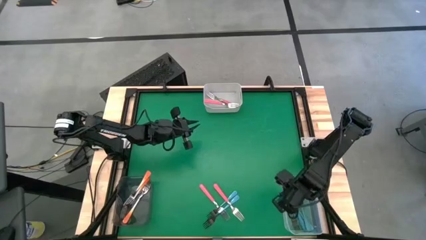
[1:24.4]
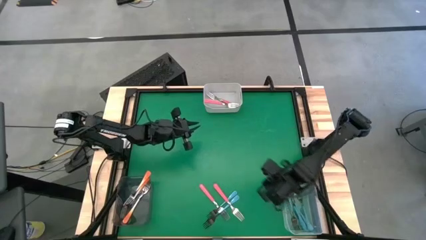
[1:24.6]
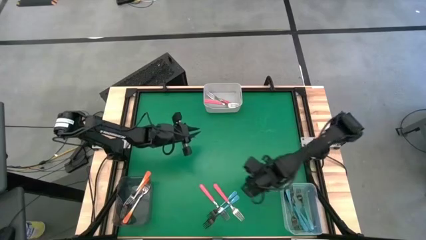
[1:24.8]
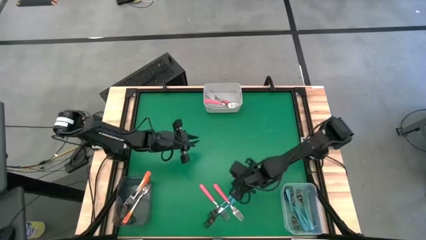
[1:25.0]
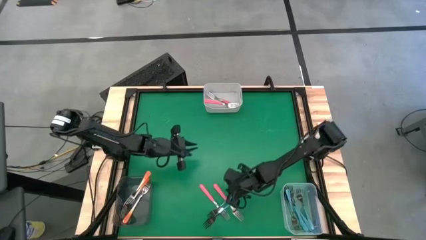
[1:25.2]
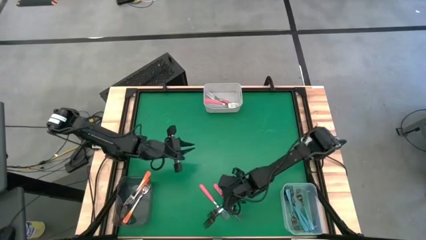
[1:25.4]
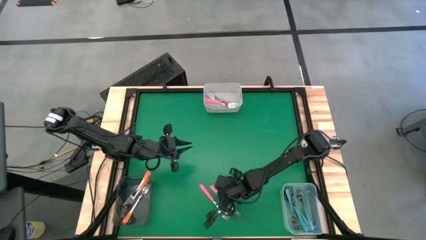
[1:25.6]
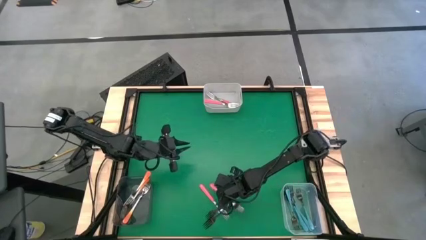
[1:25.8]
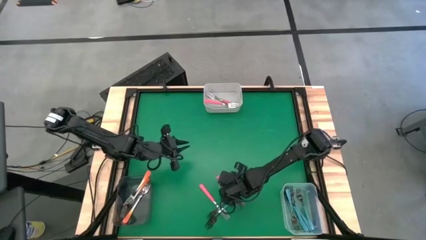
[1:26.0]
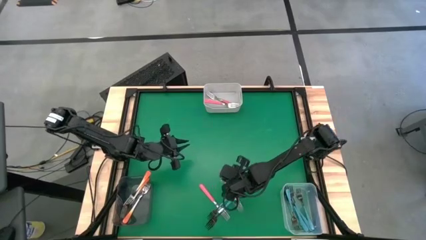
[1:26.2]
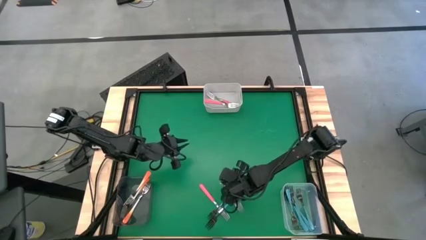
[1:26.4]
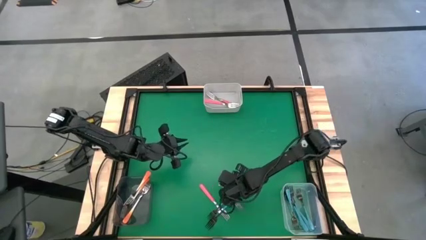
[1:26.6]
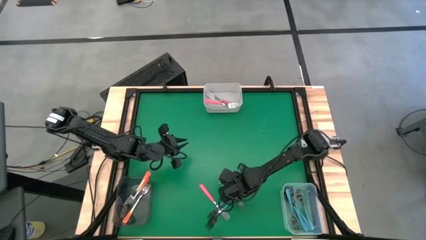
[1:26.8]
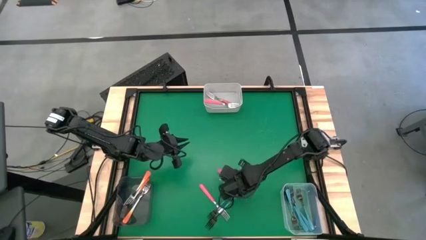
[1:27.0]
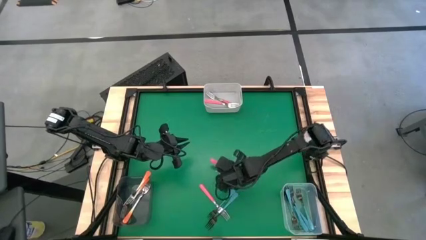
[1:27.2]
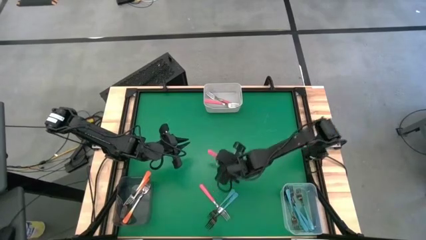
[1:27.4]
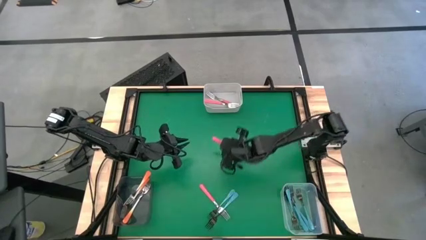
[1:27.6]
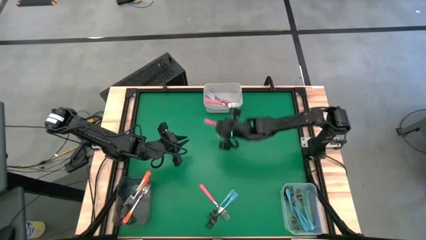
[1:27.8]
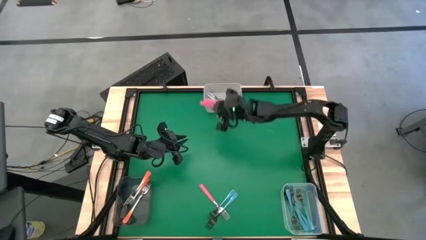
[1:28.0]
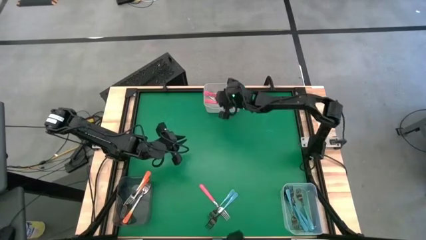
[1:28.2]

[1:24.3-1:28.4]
Task: Sort silverware by color (type)
Put the pink fork into the white bin

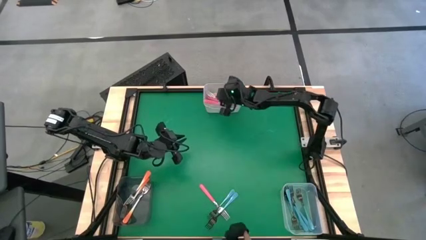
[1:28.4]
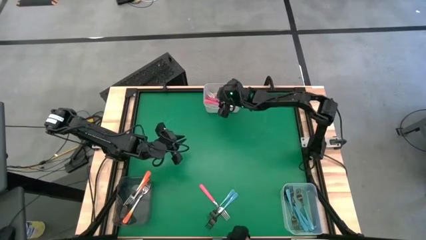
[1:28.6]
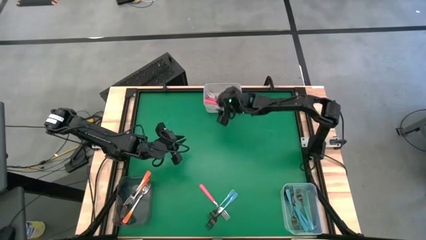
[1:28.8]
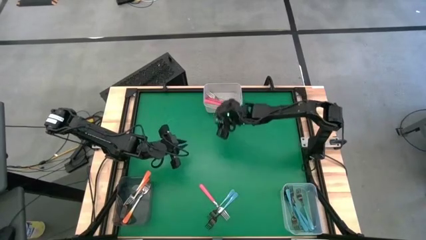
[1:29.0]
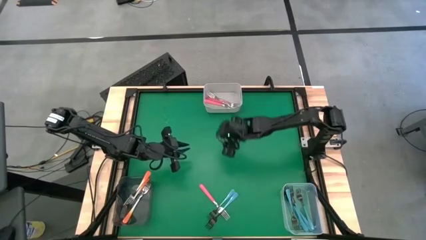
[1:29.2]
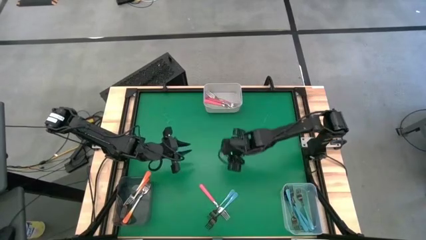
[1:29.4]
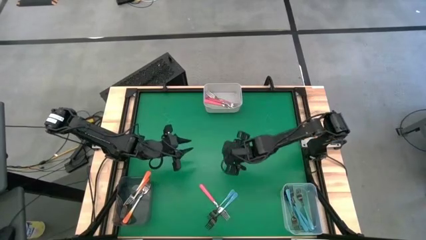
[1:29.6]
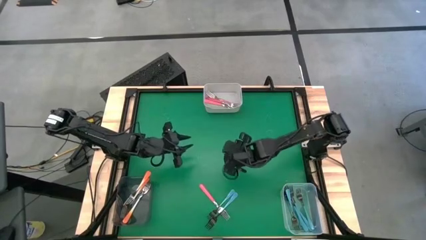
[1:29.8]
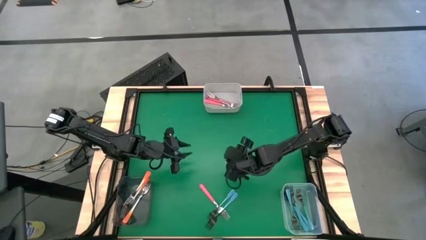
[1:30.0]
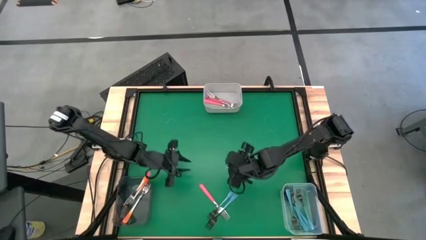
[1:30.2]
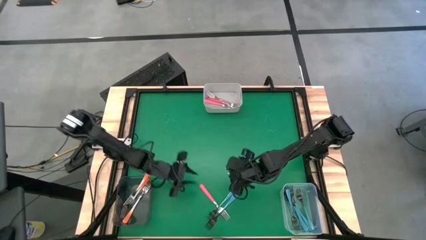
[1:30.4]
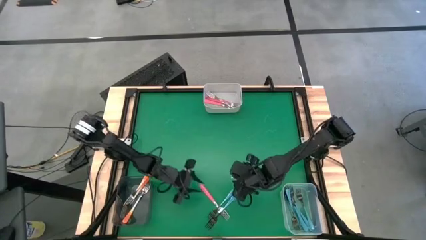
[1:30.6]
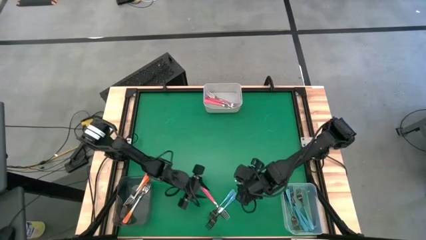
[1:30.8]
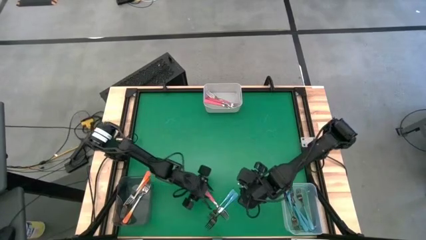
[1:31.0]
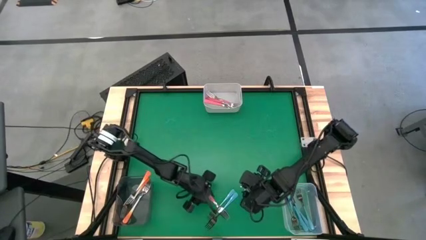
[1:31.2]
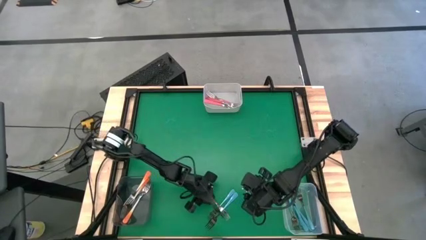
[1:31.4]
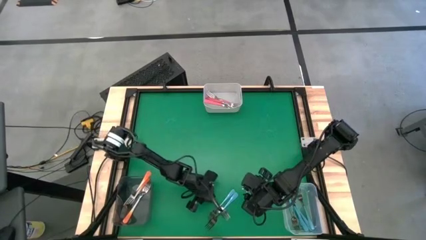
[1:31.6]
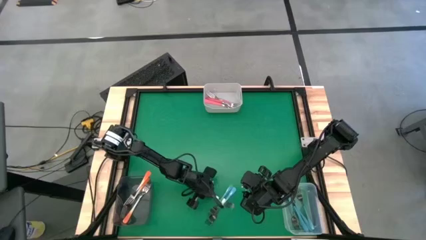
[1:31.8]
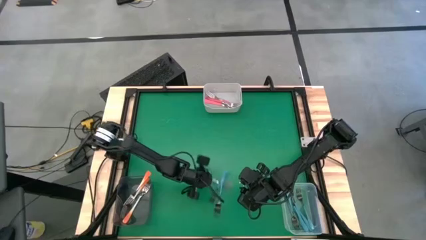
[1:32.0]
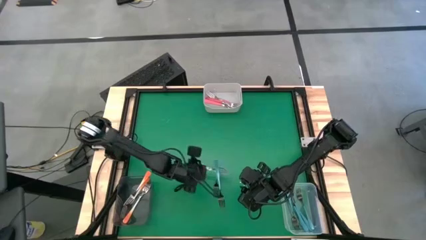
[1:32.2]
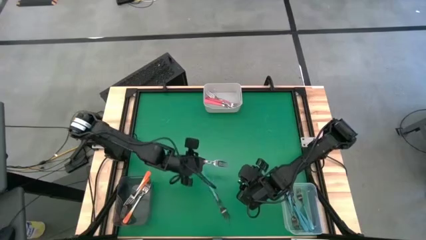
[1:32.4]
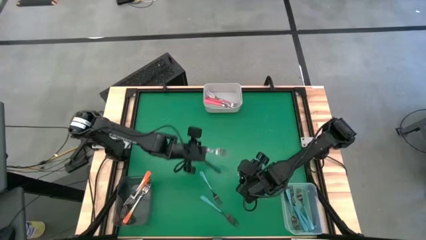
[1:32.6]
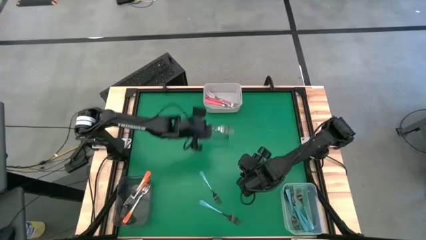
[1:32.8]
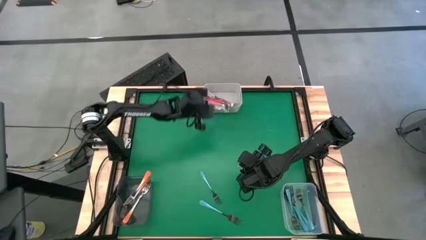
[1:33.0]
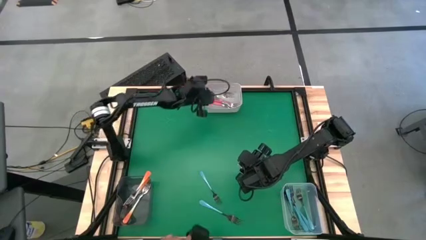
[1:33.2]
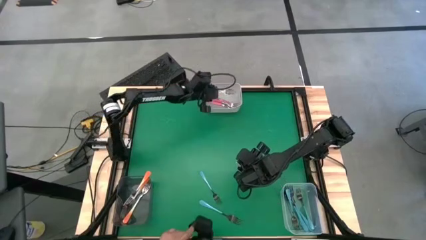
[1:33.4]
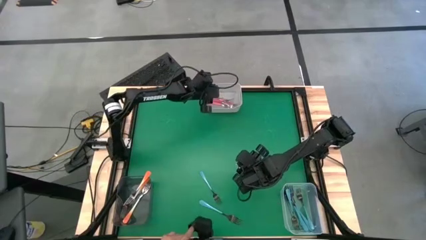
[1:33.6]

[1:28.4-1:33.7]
Put the pink fork into the white bin

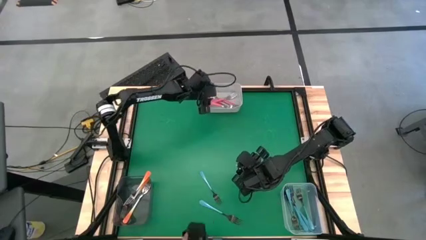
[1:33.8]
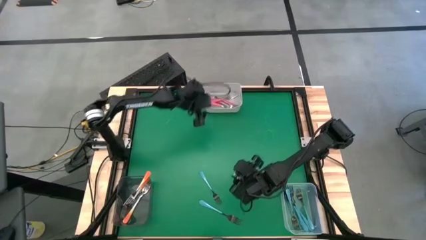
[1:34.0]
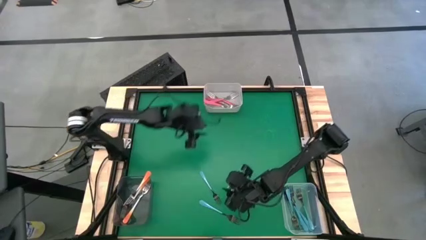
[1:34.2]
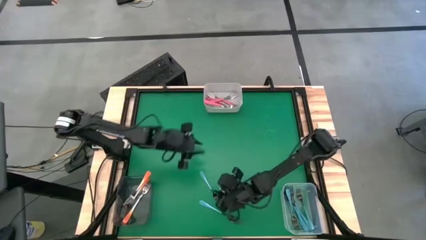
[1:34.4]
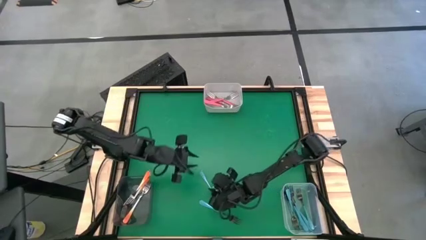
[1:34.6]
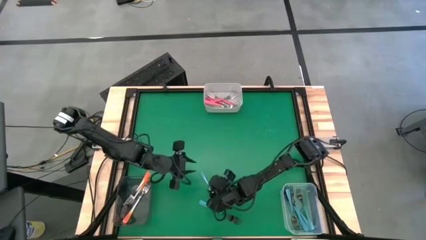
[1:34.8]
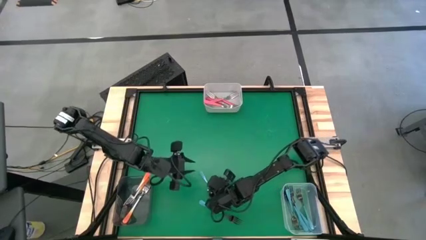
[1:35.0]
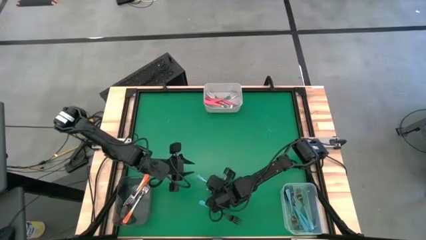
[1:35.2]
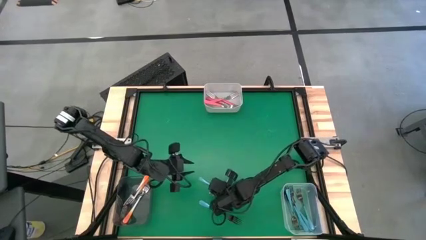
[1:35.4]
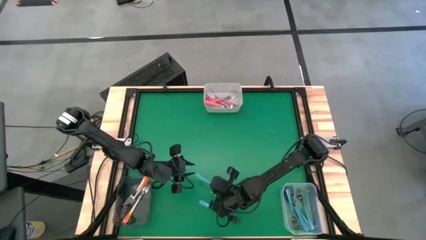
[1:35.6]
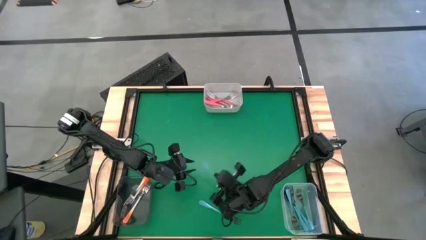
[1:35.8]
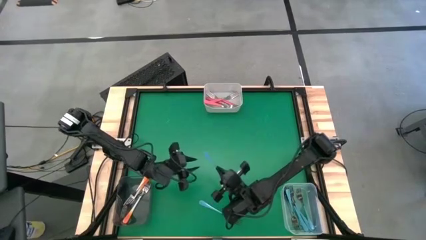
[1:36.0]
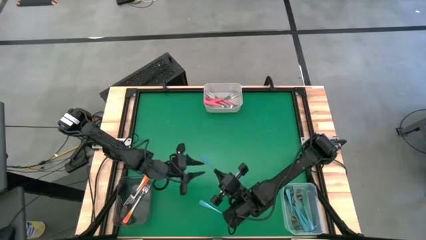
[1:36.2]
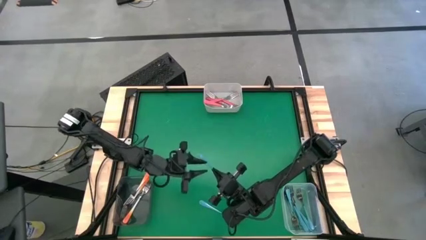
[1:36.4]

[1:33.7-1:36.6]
Put the blue fork into the transparent bin

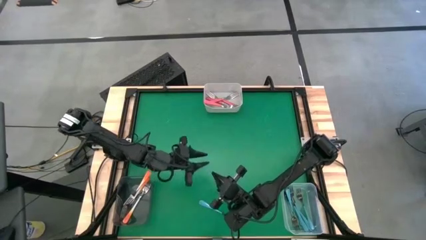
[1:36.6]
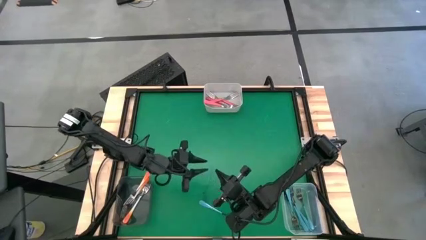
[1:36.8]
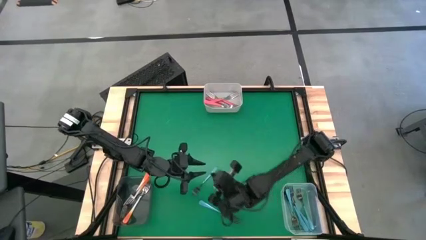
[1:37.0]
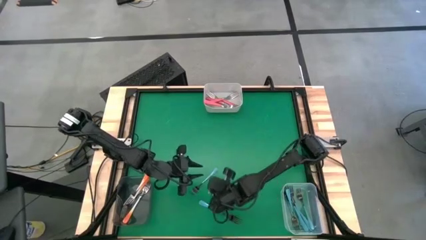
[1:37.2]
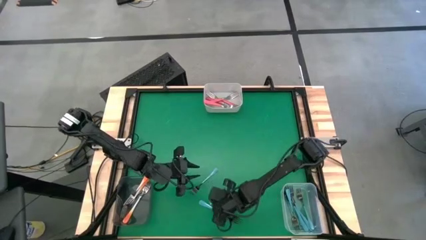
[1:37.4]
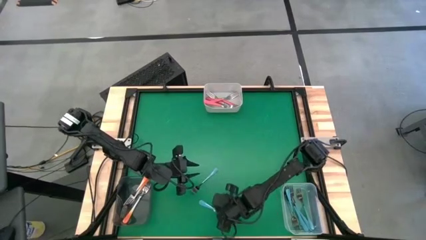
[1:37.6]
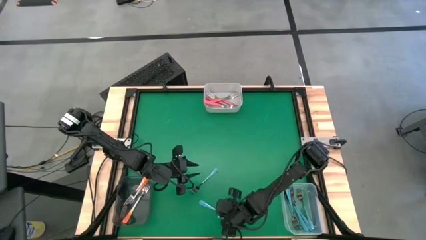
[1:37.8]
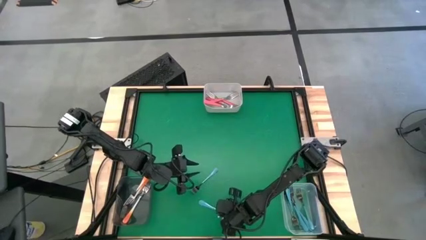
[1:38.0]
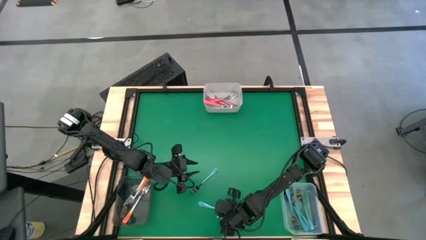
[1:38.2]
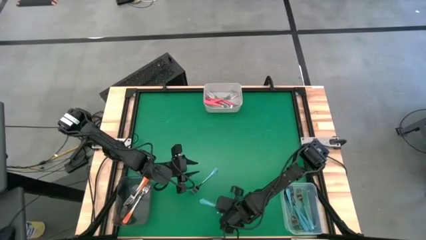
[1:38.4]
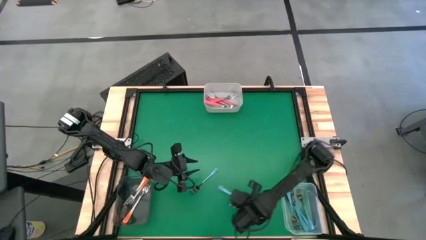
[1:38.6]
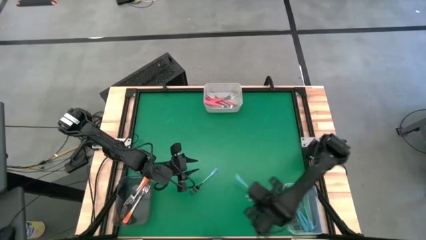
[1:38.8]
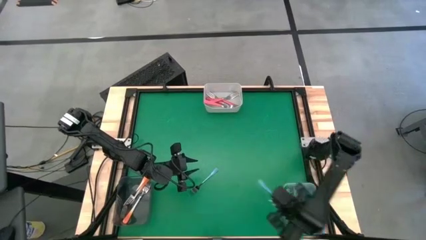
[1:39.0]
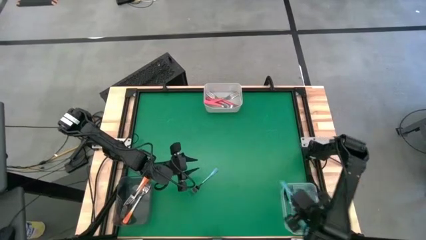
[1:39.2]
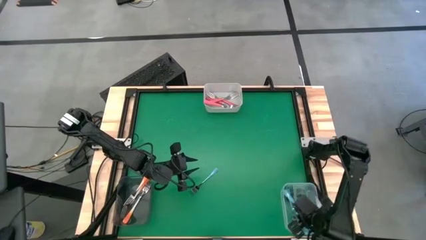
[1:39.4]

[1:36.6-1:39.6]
Put the blue fork into the transparent bin

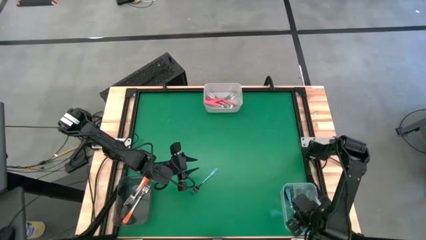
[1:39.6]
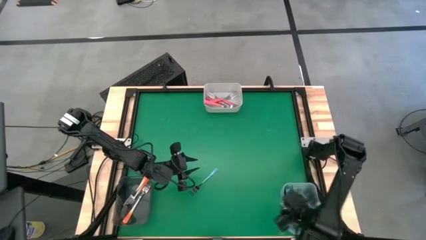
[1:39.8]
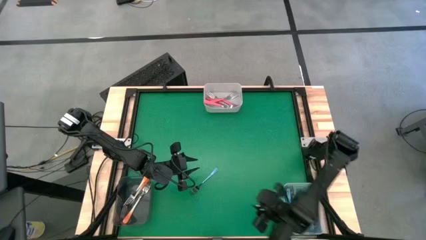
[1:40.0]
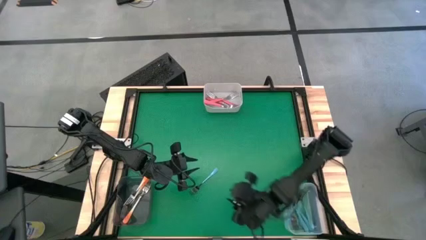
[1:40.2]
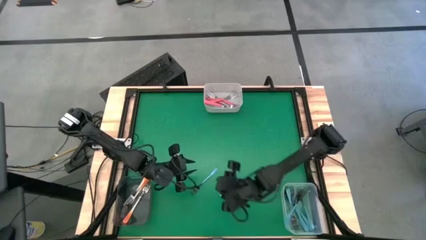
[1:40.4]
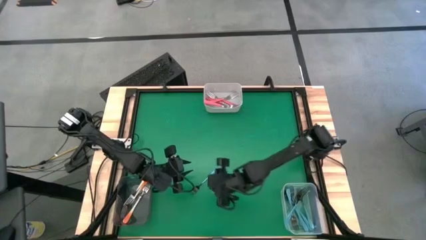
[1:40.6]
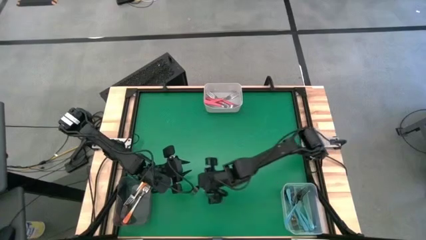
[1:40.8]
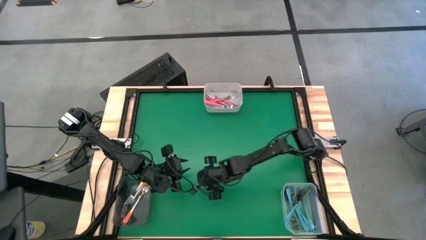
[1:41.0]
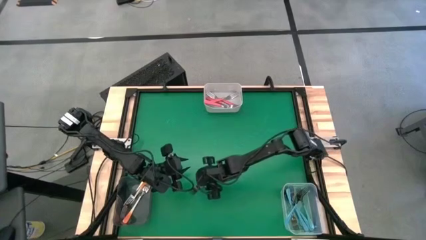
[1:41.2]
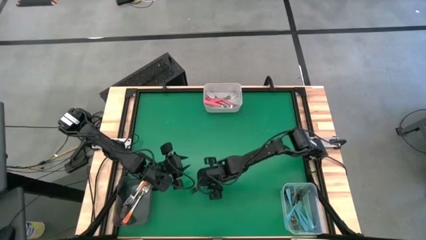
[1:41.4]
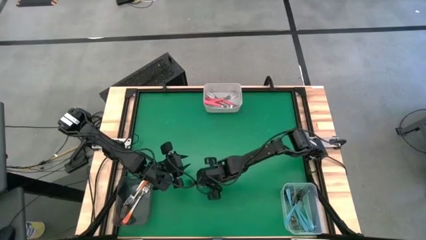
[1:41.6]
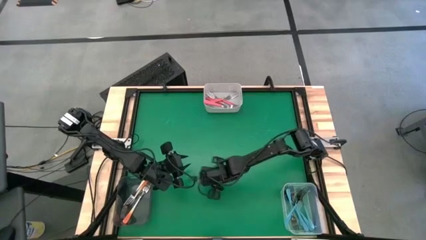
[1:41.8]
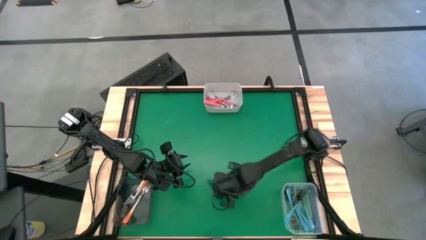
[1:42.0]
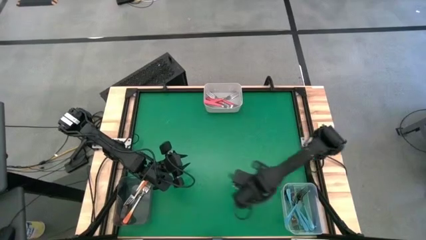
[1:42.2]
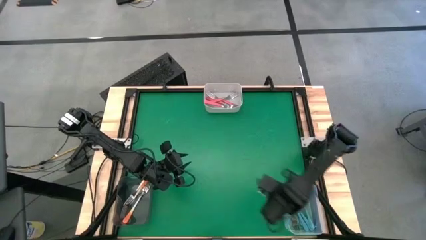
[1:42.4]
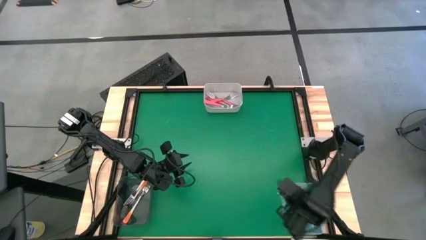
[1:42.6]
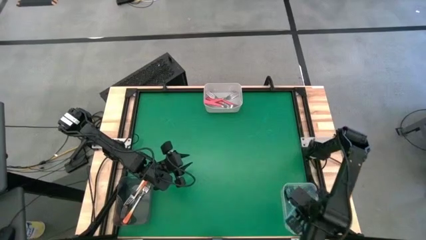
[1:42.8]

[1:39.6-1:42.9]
Put the blue fork into the transparent bin
